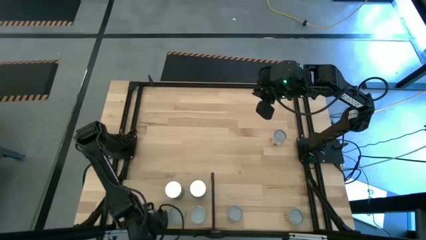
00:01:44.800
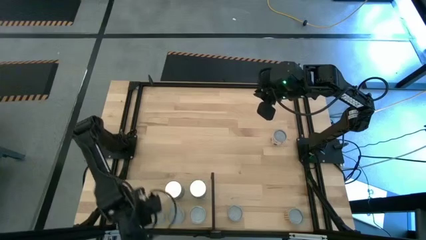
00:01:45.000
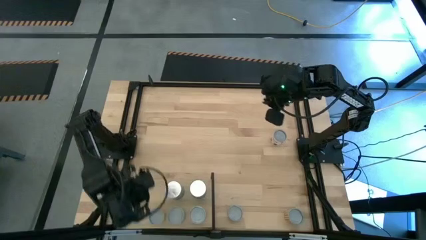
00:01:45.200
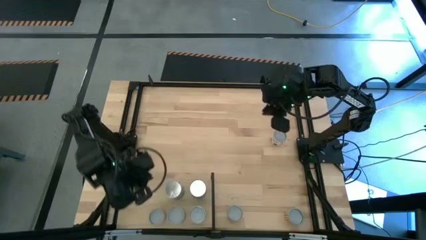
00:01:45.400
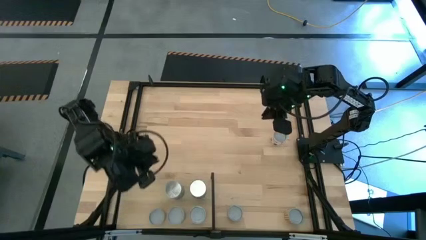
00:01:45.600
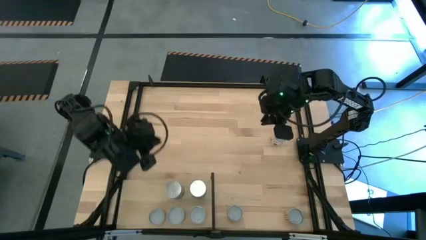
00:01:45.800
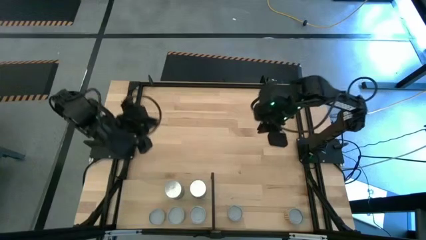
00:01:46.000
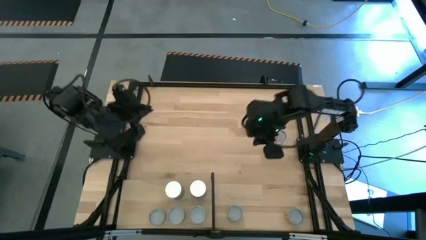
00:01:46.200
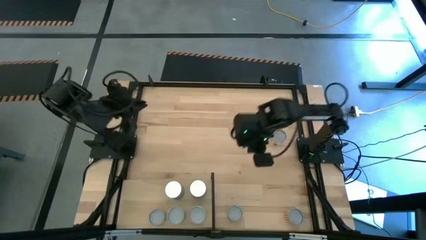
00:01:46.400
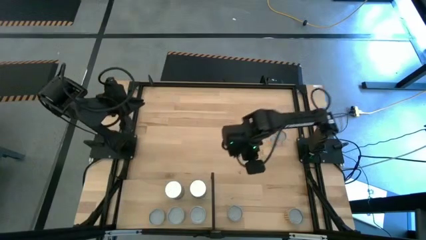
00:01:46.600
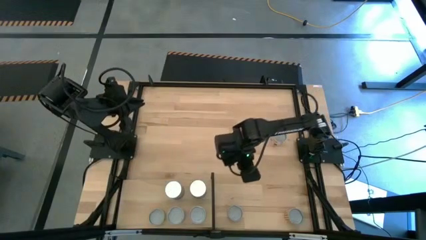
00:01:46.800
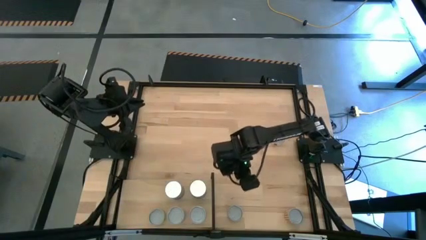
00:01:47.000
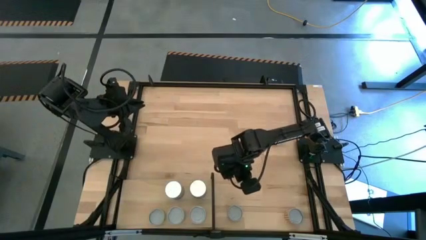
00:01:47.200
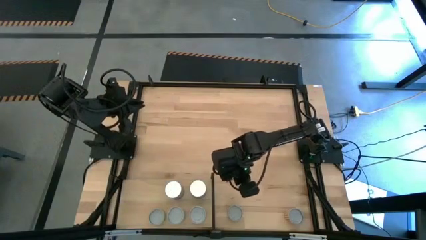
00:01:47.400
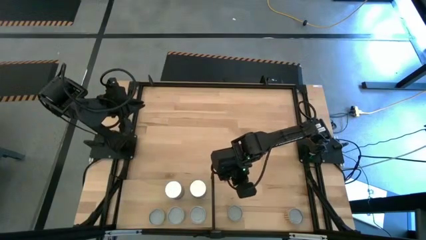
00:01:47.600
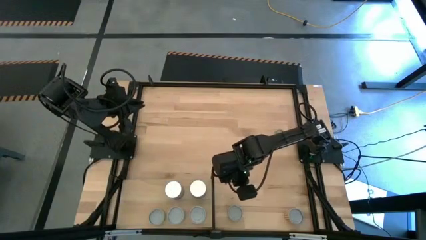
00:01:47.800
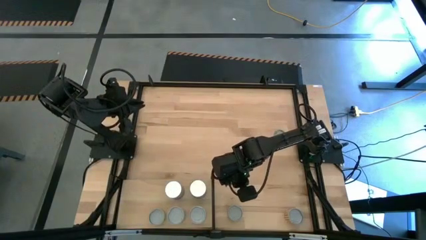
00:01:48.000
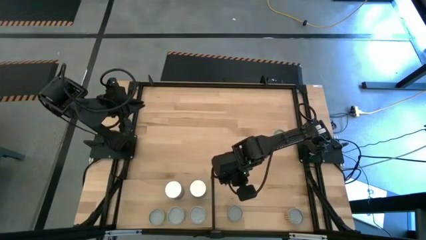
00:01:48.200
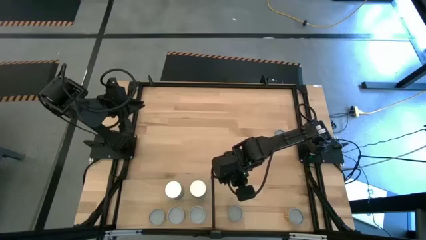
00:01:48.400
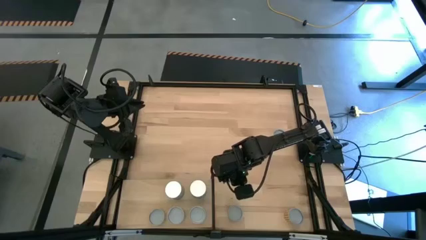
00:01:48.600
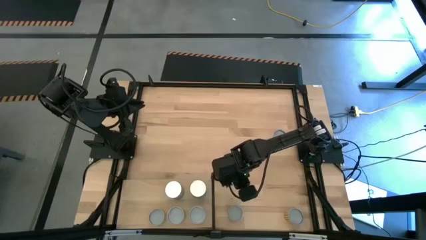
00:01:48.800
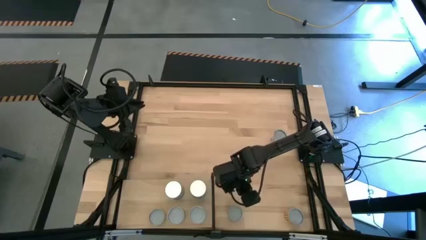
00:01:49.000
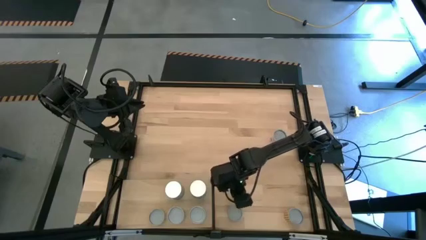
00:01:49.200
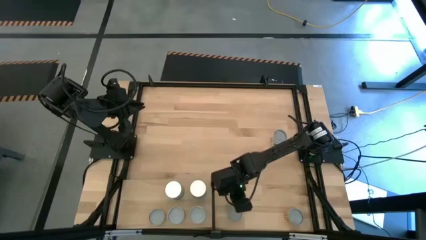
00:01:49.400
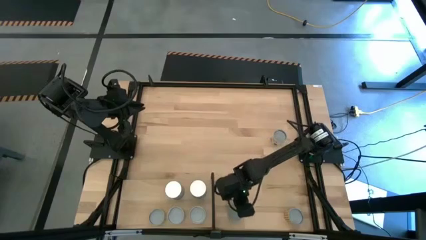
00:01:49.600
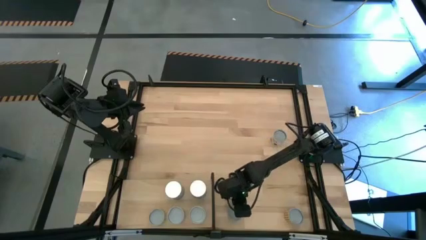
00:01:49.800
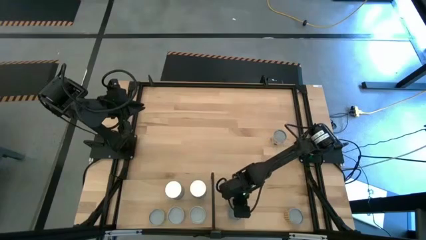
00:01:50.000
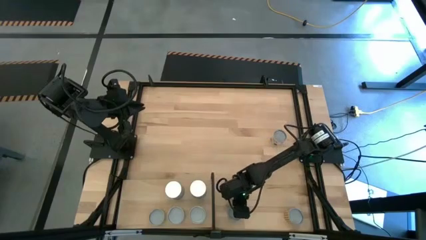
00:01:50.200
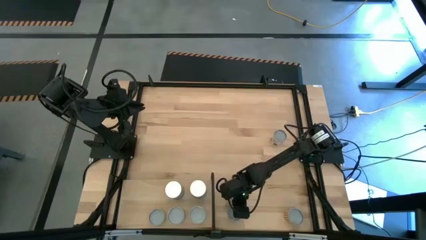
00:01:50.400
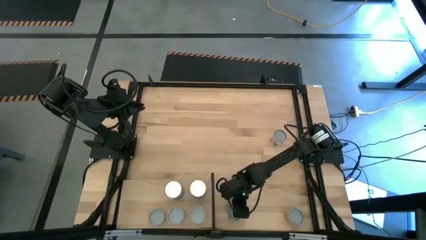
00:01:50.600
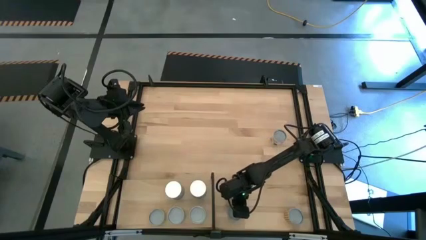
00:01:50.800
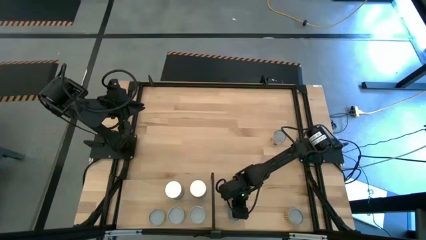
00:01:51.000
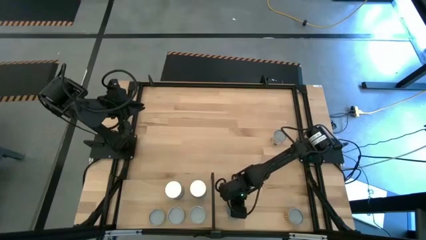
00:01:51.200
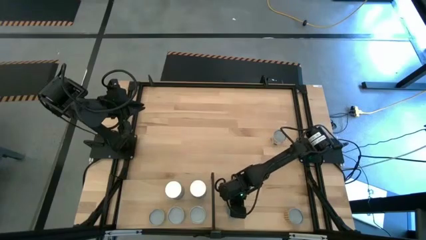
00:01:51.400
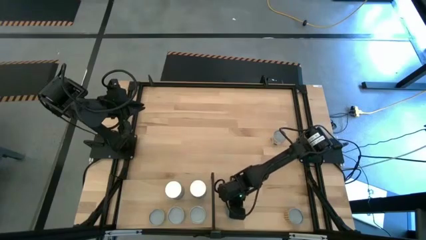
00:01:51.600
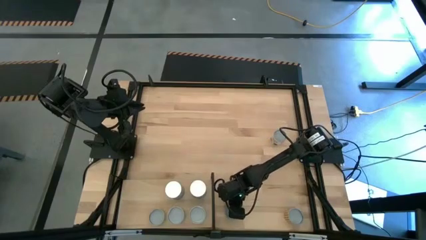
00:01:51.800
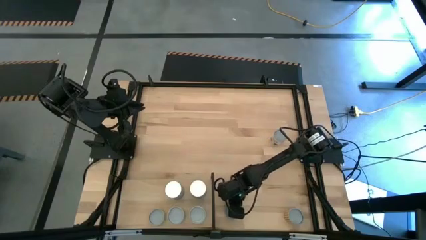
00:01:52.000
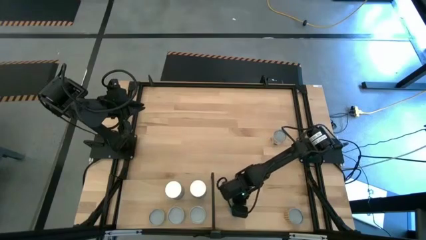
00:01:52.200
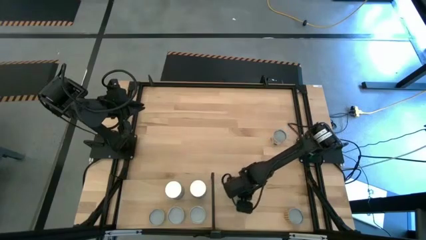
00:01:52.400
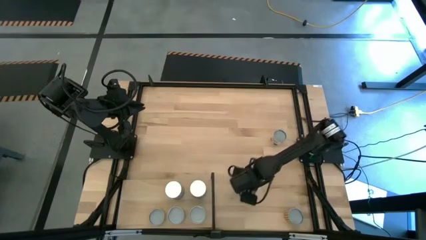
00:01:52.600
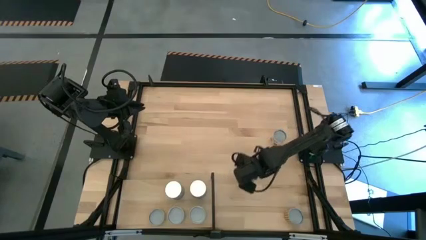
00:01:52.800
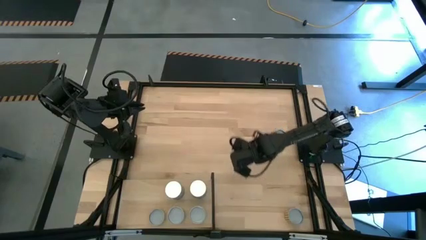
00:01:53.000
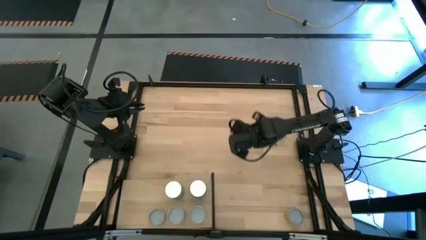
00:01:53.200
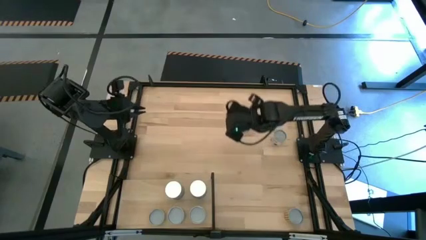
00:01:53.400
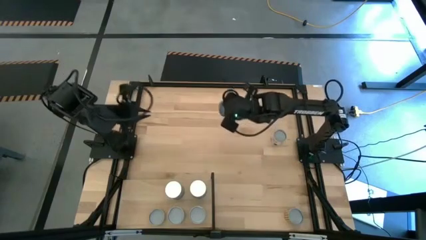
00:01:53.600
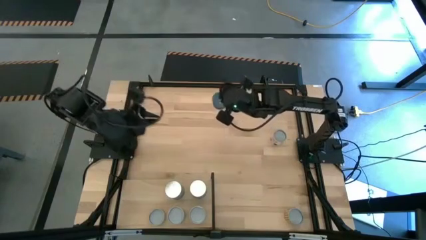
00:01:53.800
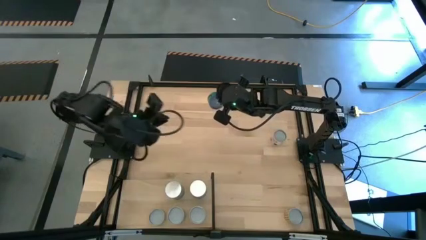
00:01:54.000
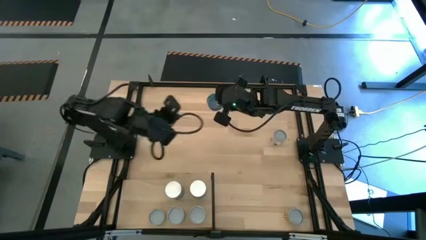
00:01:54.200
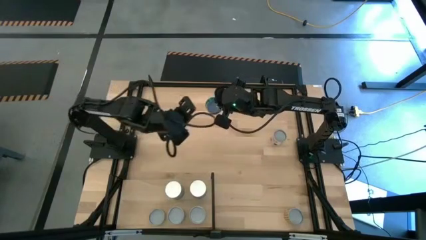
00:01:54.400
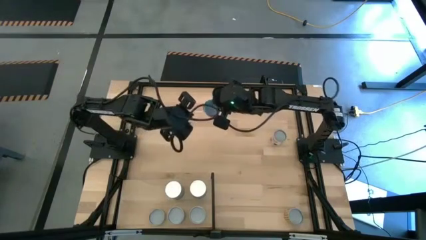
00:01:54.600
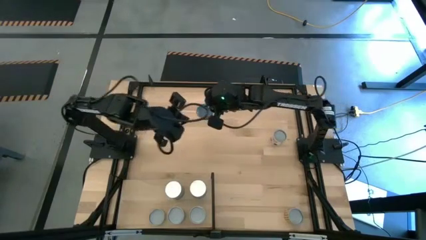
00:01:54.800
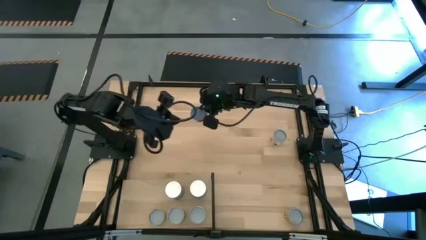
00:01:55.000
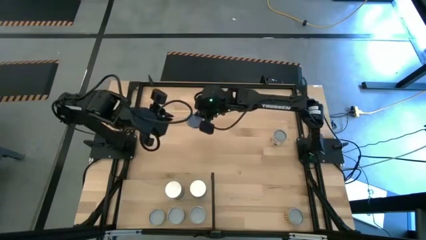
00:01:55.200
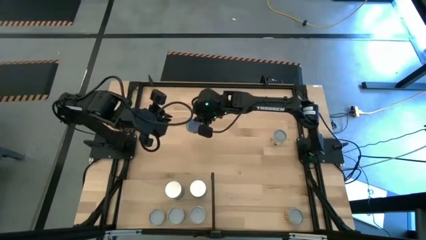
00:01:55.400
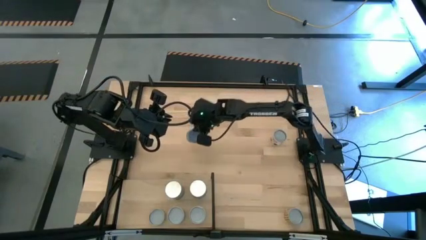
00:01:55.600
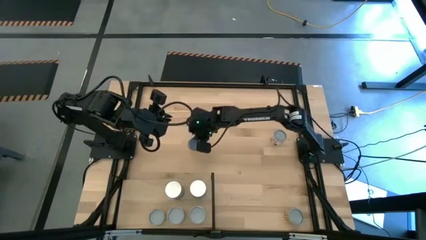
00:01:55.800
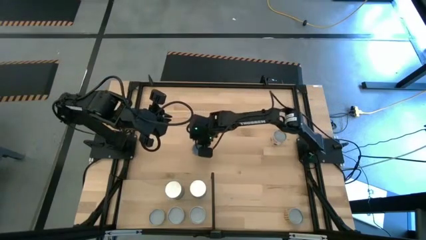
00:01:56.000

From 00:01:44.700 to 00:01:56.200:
Task: Pick and place cans onto a shelf
Put the canned tuna on the shelf

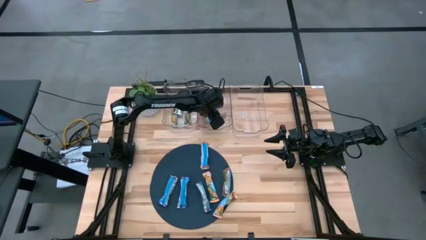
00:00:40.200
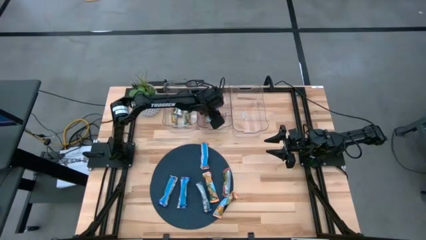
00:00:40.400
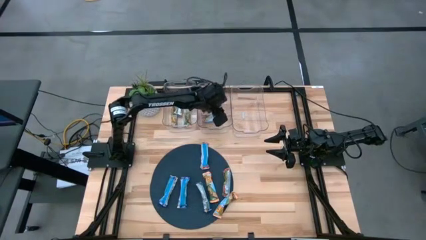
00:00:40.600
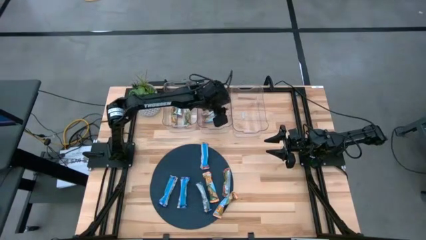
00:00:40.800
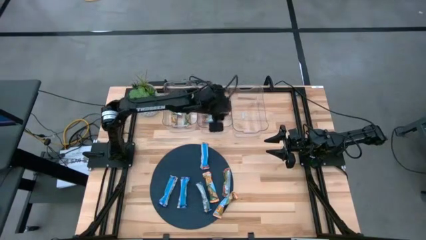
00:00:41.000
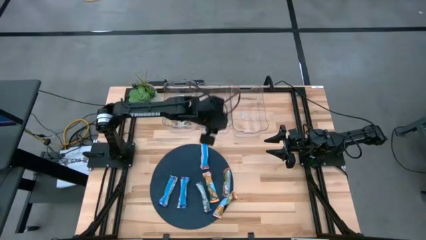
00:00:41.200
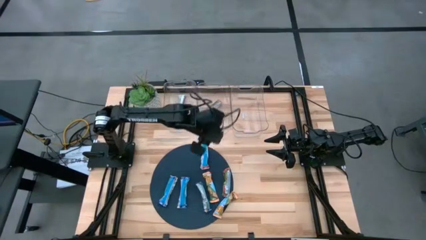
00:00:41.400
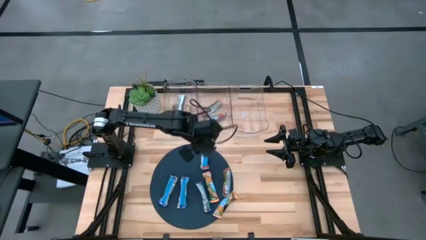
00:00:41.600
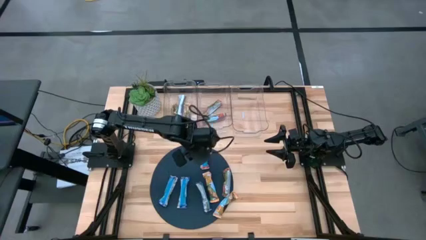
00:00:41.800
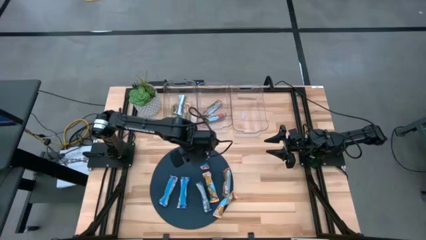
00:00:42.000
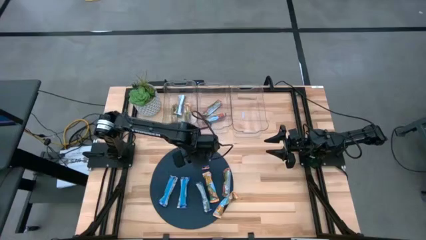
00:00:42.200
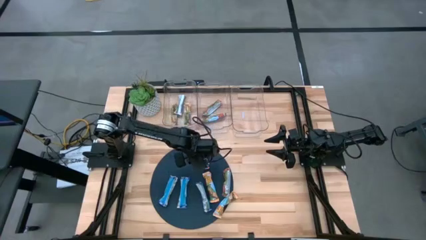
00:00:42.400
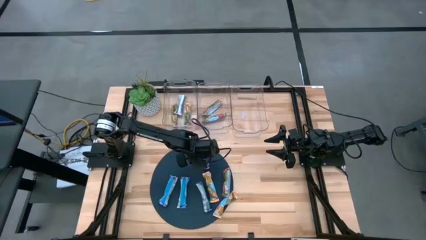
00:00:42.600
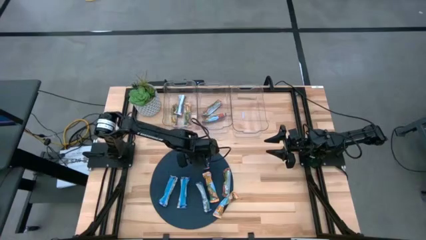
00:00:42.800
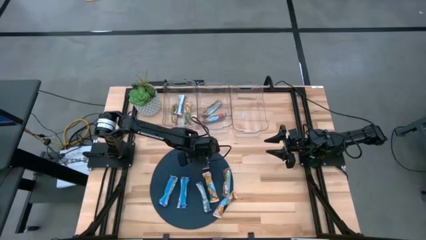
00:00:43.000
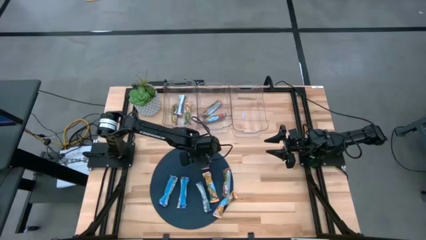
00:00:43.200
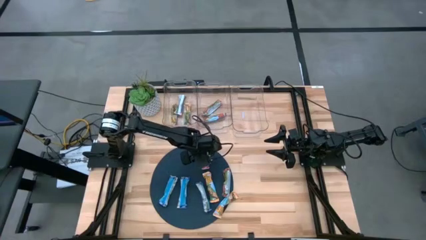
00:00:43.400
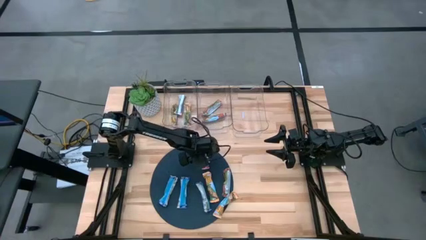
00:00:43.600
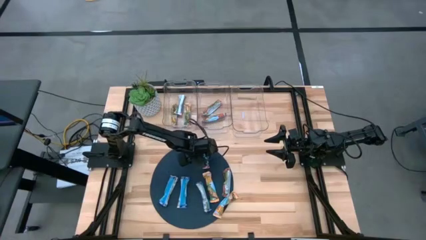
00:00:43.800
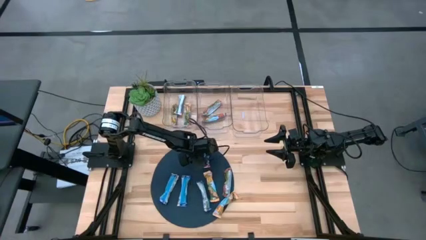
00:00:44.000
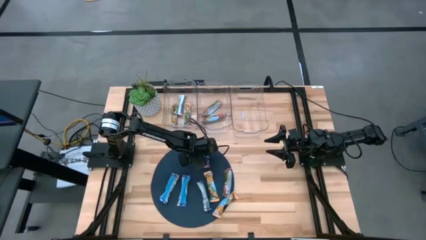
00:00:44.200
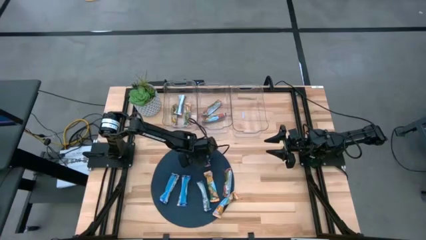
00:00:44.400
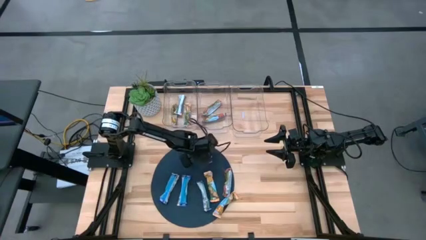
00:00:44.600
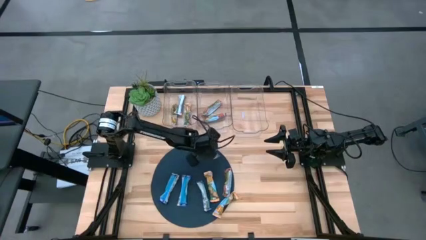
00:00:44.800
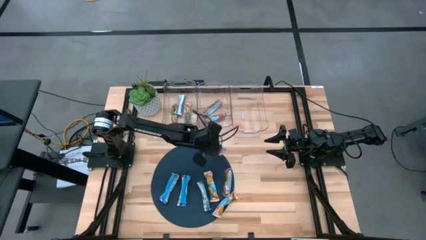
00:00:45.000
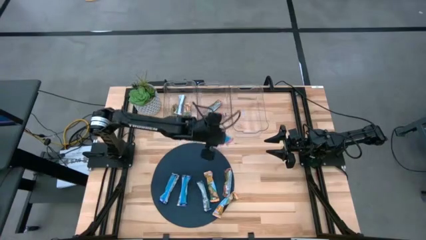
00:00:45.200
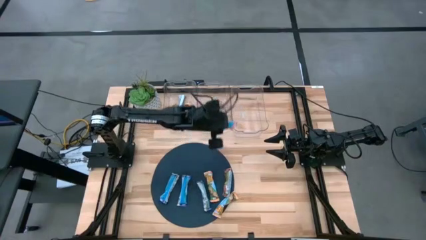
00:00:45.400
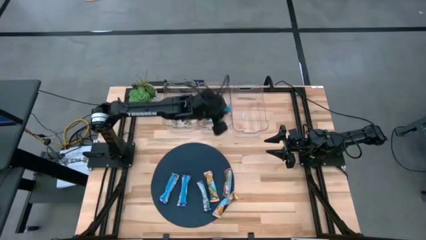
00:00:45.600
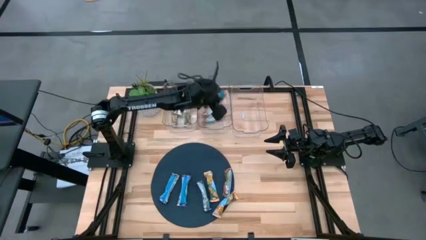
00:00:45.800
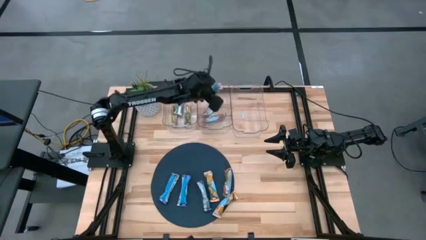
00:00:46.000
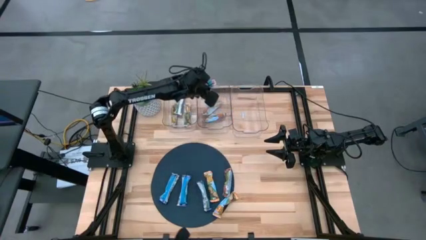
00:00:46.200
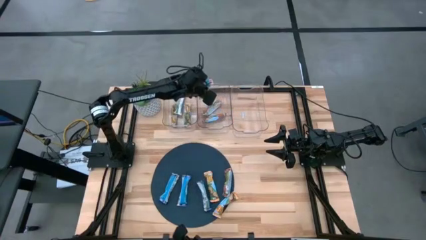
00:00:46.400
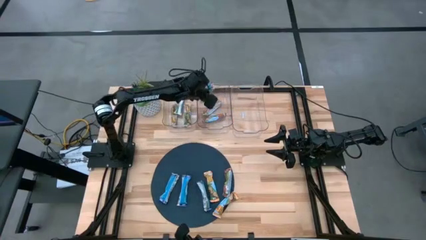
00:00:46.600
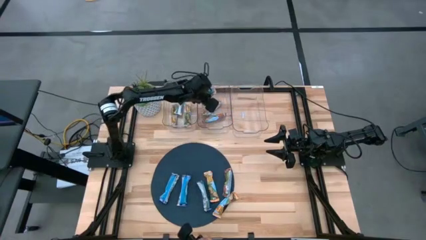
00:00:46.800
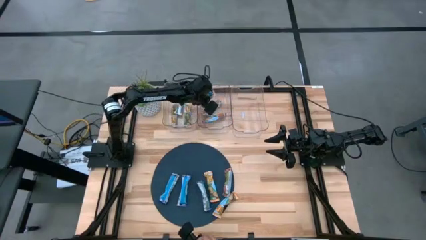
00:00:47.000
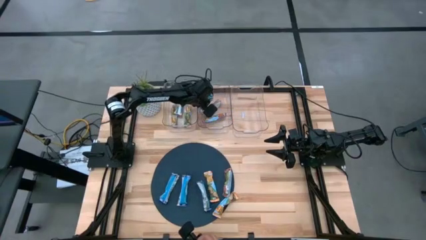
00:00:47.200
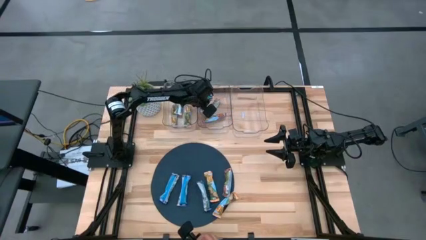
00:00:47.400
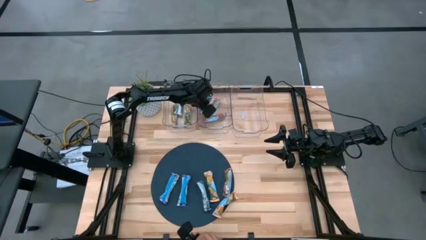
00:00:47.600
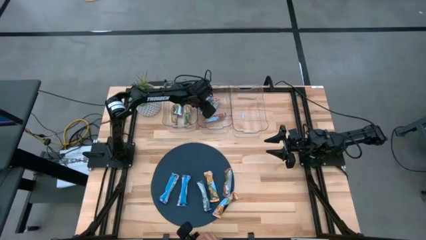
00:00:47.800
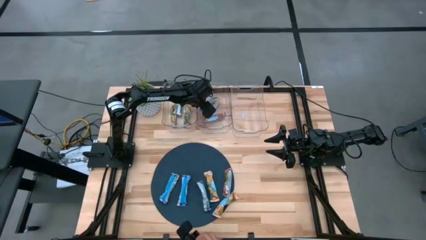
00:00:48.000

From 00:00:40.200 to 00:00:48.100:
Task: Pick and place Granola Bars by type
Put the red granola bar into the center transparent bin
